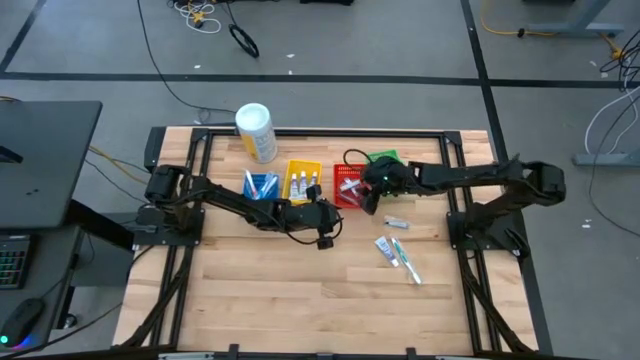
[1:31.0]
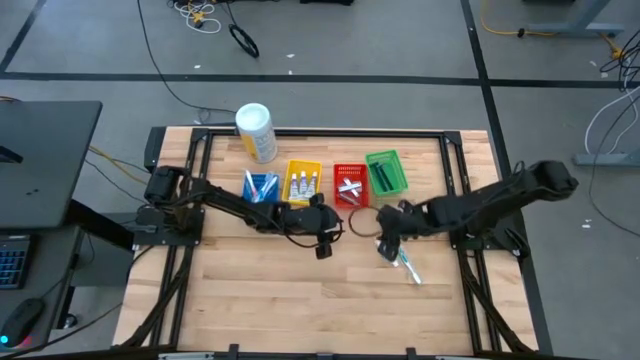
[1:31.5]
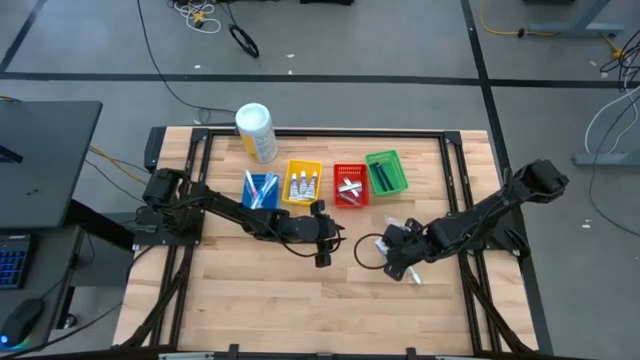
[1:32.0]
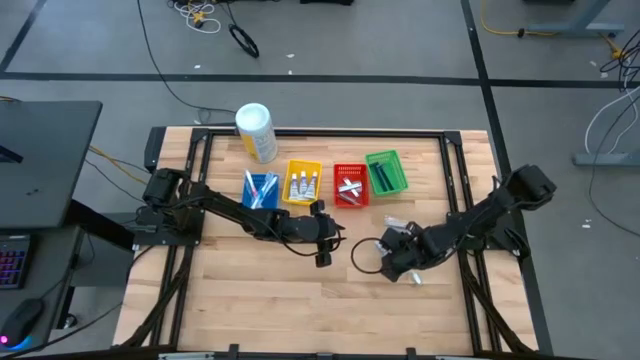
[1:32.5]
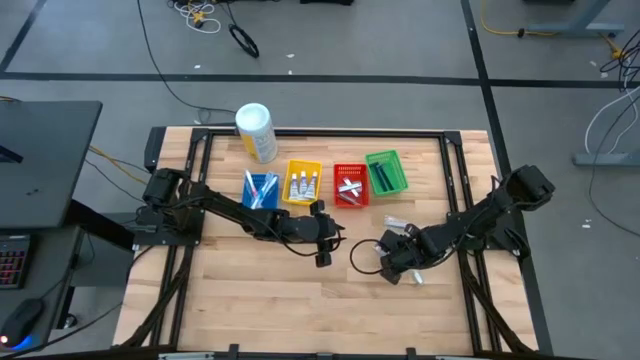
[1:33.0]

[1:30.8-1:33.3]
Task: Pick & Place Travel size toiletries
Put the white toothpaste into the yellow bin

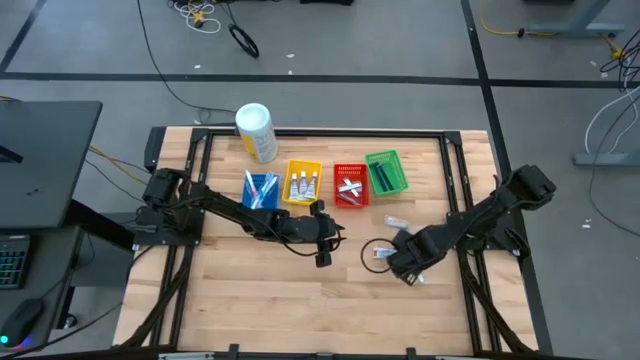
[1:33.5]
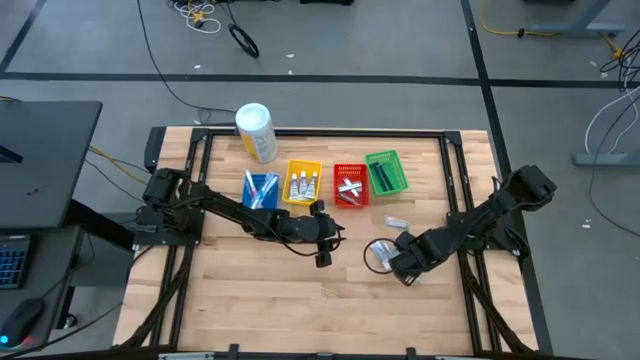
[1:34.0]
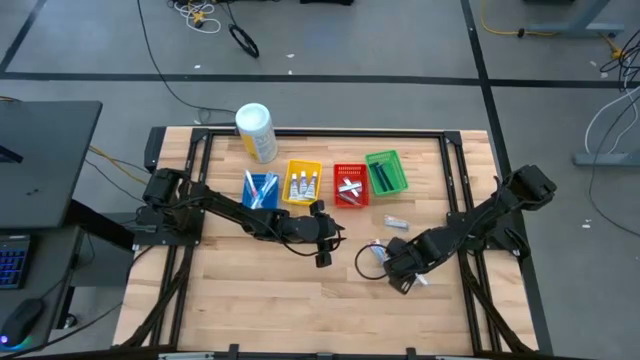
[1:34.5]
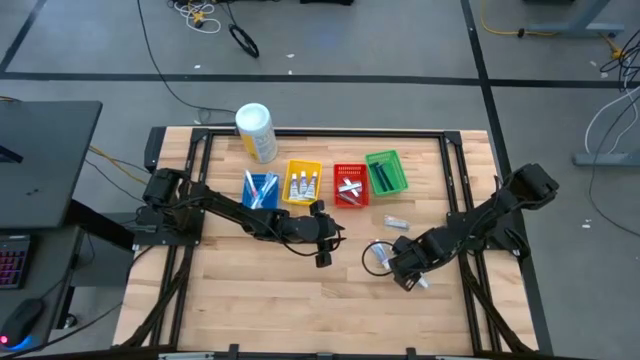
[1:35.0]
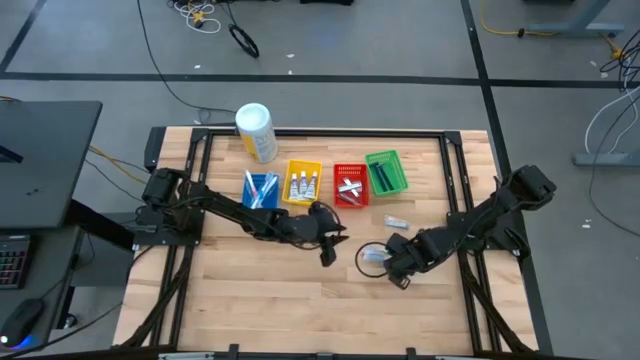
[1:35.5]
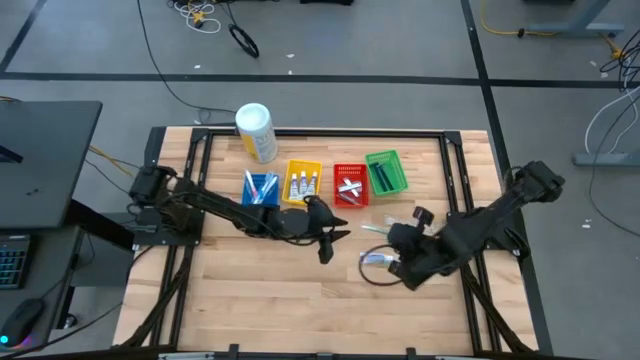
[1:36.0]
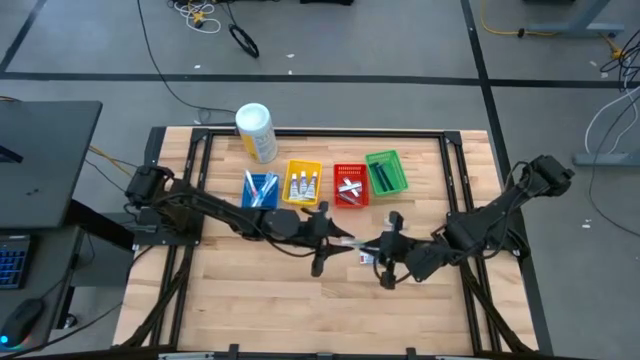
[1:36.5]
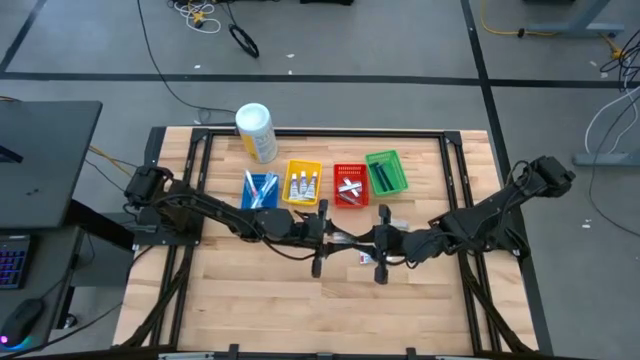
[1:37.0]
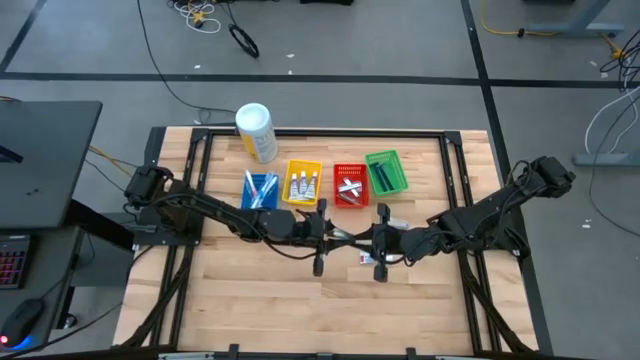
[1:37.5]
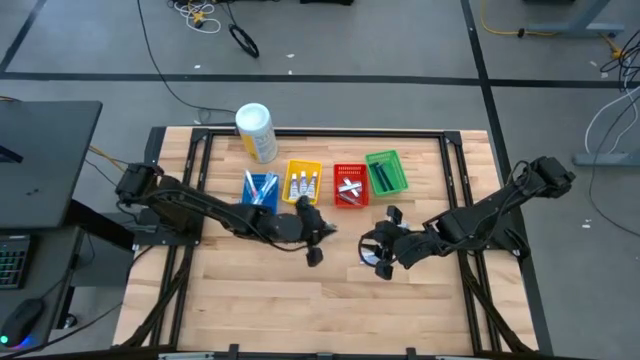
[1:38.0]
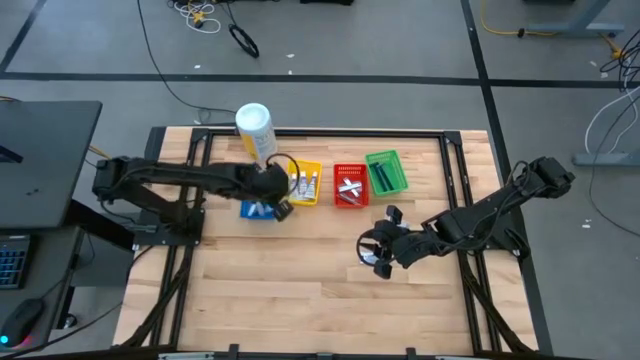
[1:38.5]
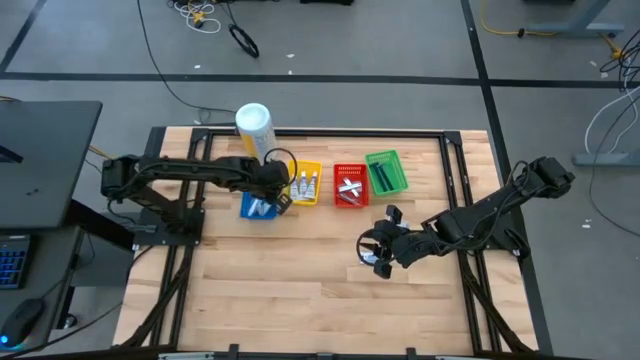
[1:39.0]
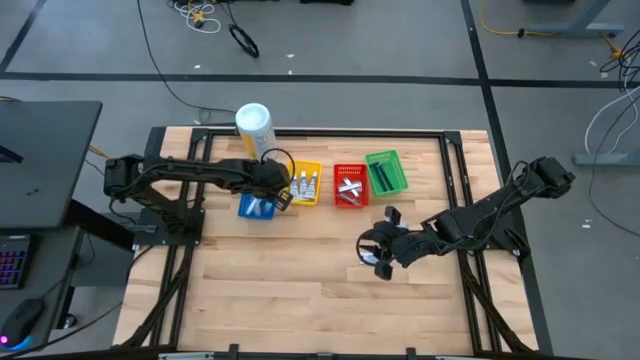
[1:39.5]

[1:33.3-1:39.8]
Put the green toothbrush into the blue bin

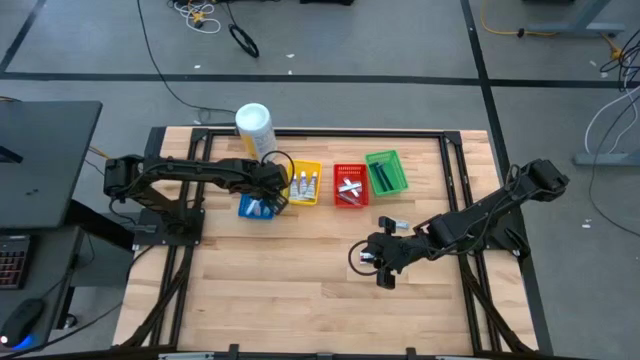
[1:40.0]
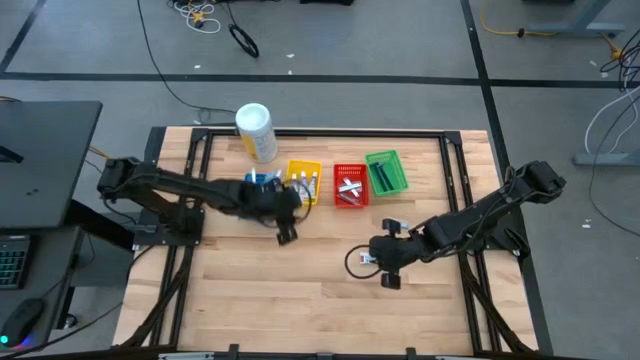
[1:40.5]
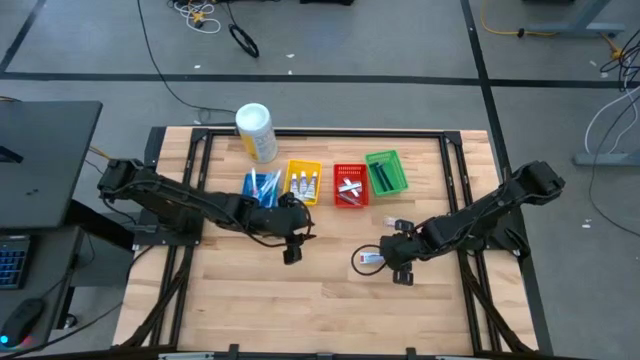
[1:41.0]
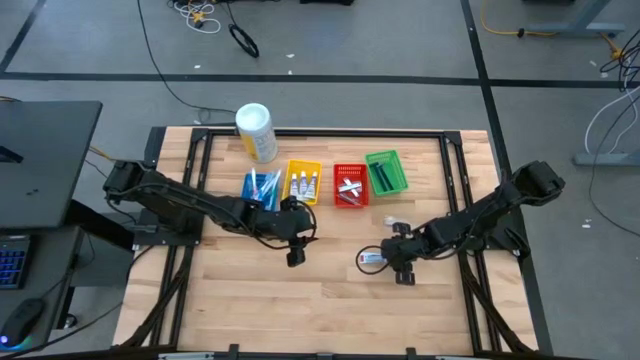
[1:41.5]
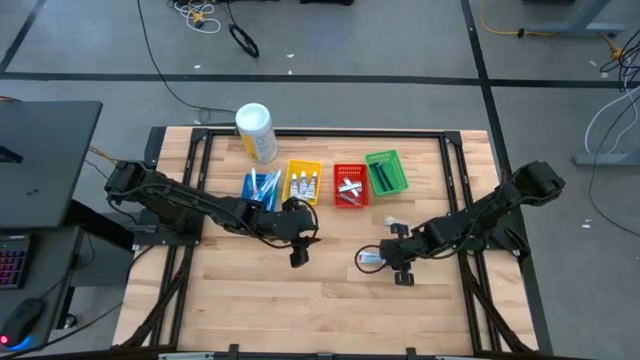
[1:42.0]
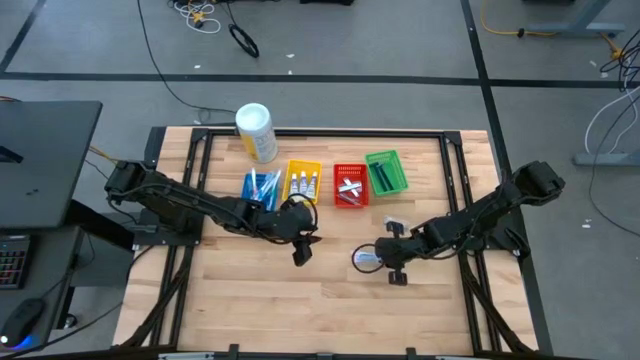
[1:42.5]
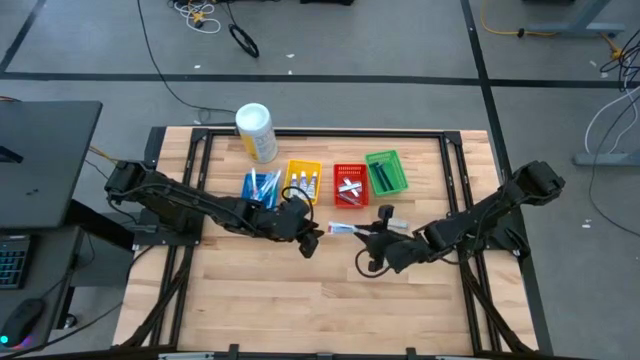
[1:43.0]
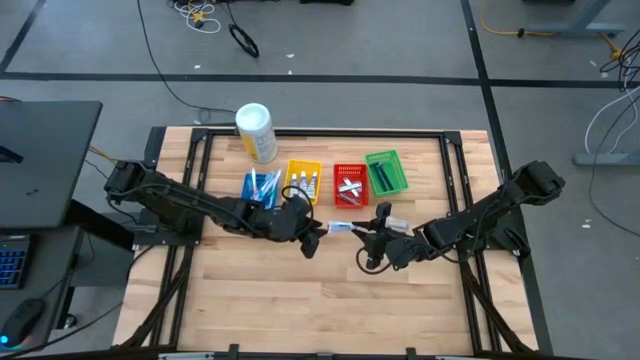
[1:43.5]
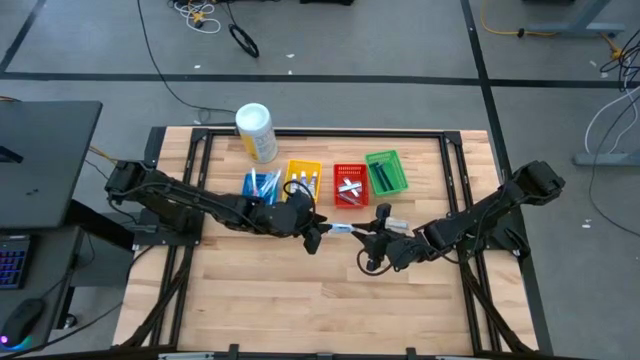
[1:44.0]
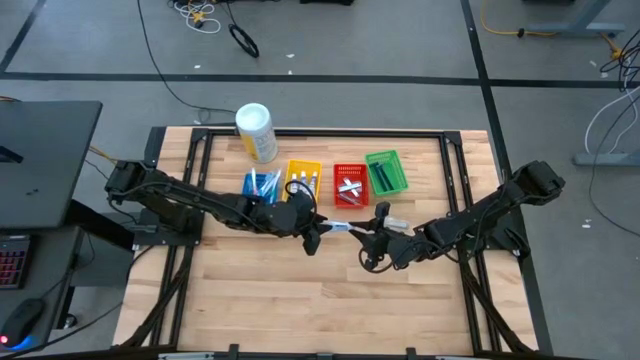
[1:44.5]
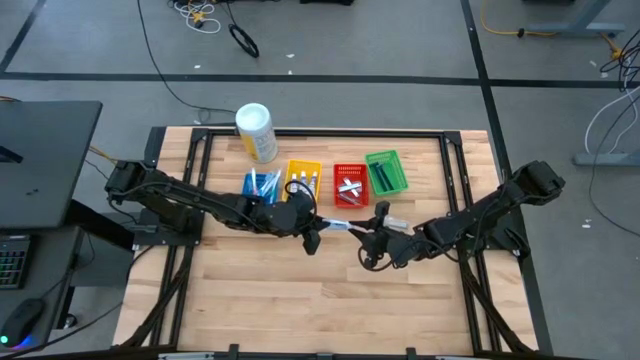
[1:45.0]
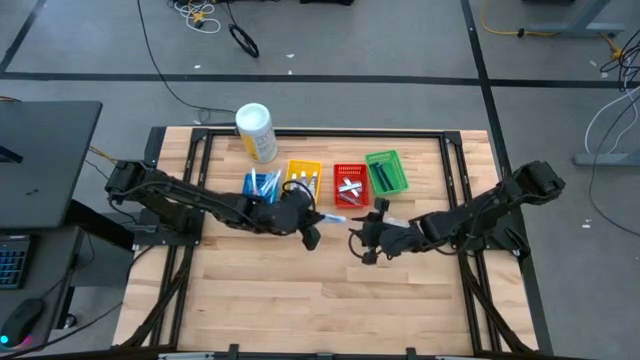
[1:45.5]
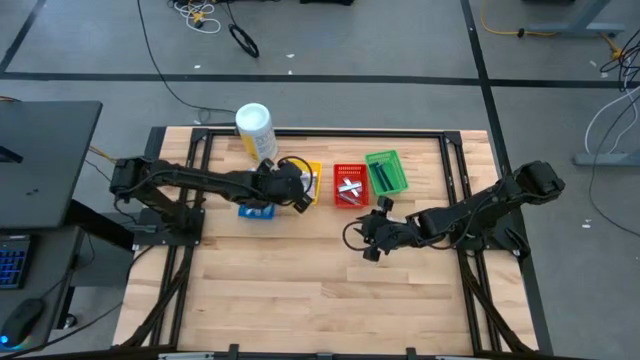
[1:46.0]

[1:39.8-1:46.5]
Put the white toothpaste into the yellow bin

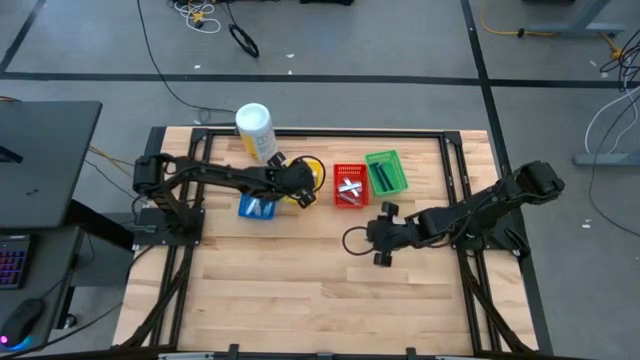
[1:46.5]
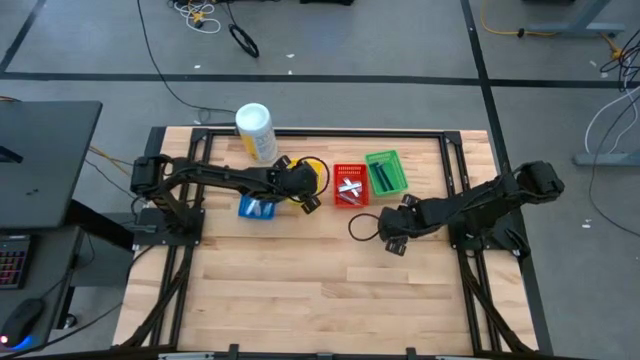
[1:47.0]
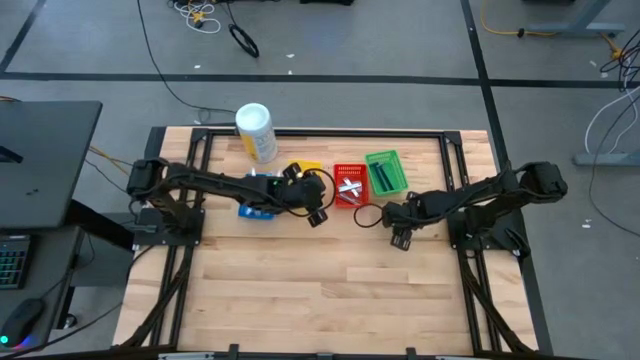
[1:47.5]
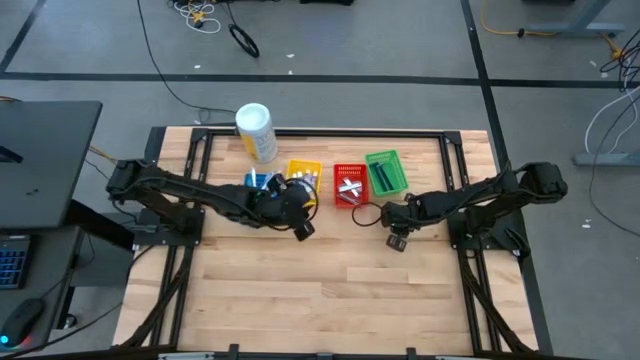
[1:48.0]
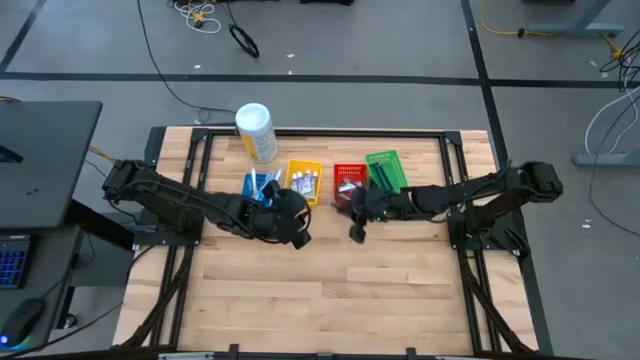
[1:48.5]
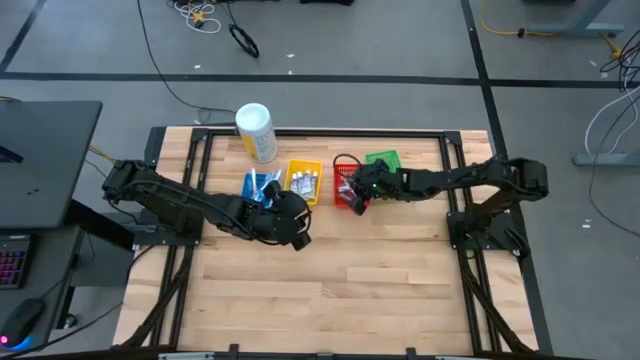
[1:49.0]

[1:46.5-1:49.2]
Put the silver nail cutter into the red bin

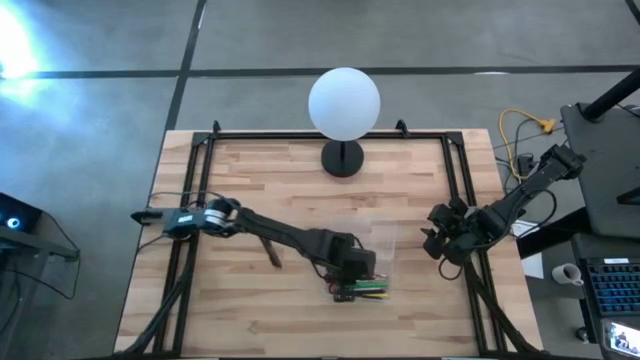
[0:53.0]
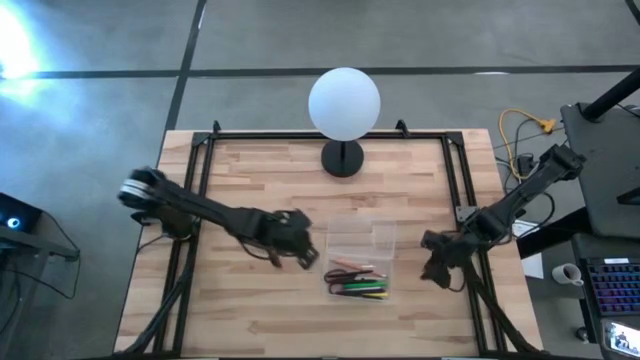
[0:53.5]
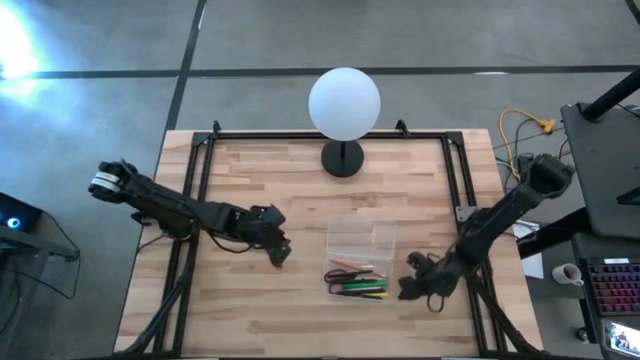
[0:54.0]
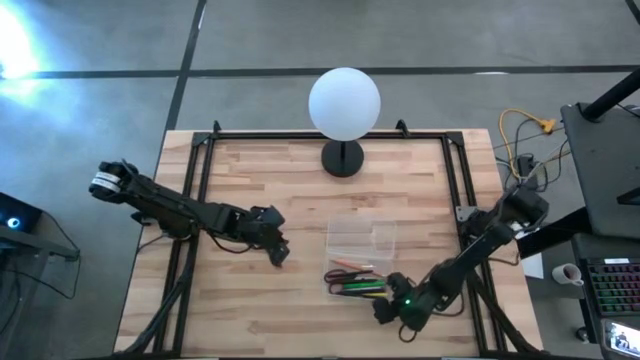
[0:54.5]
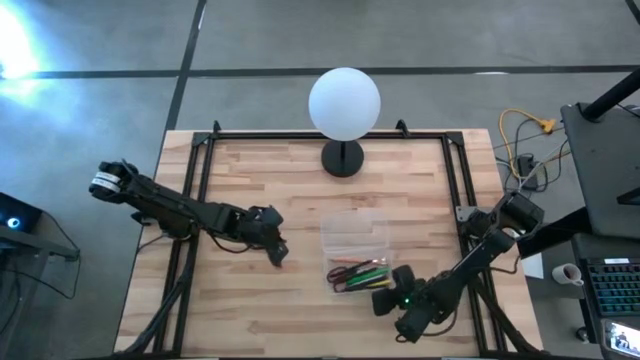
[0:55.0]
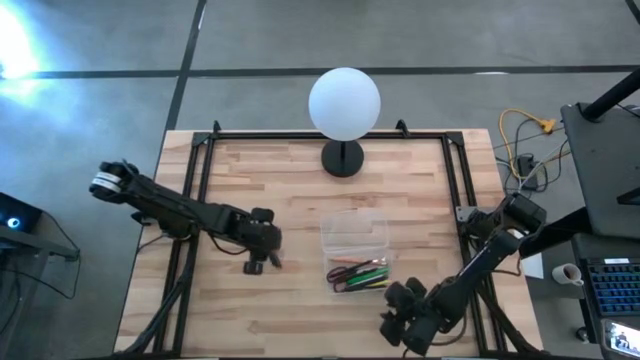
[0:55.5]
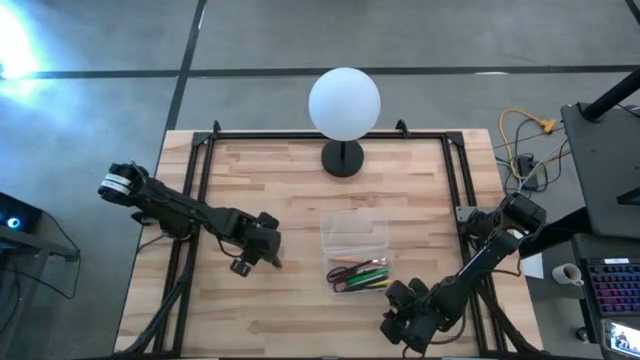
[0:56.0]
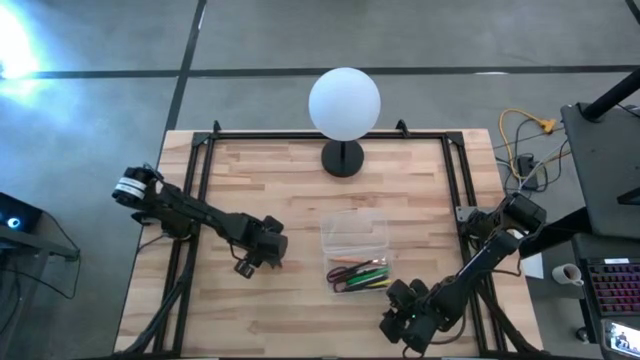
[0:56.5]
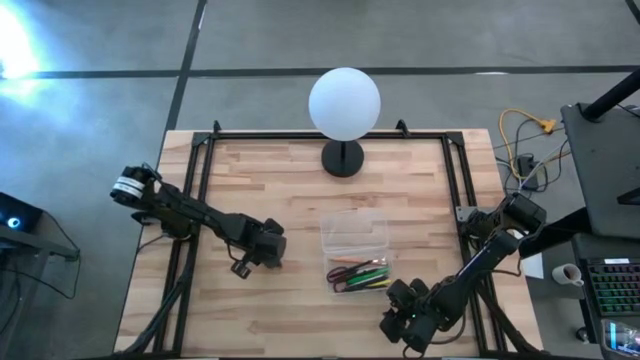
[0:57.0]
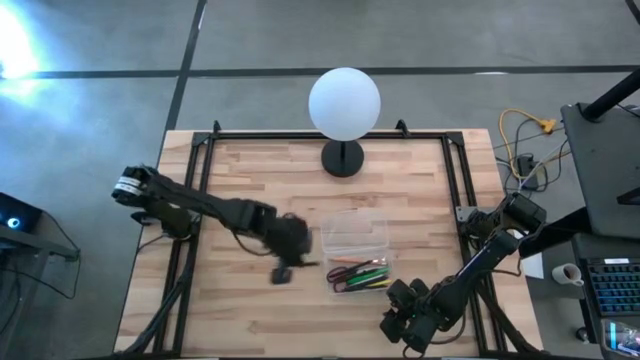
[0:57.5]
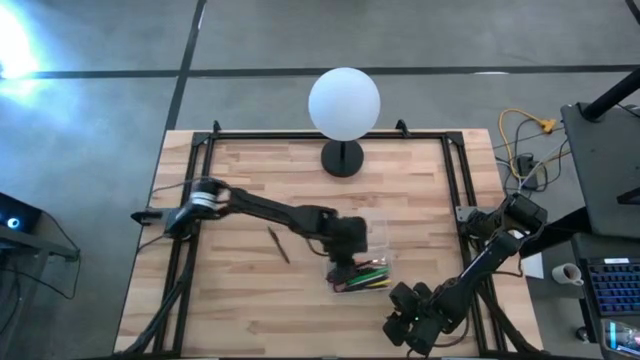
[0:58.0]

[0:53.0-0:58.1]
Task: Pick & place school supplies into a supply box
Put the black pen into the transparent supply box
